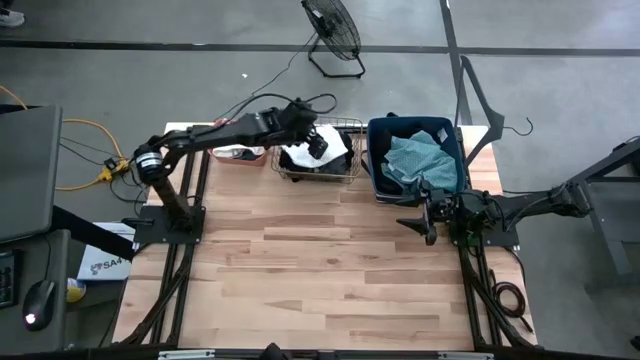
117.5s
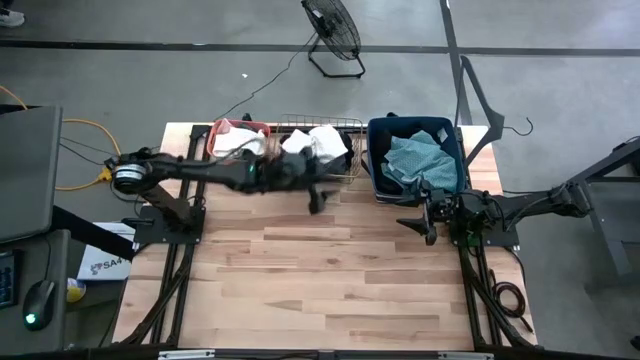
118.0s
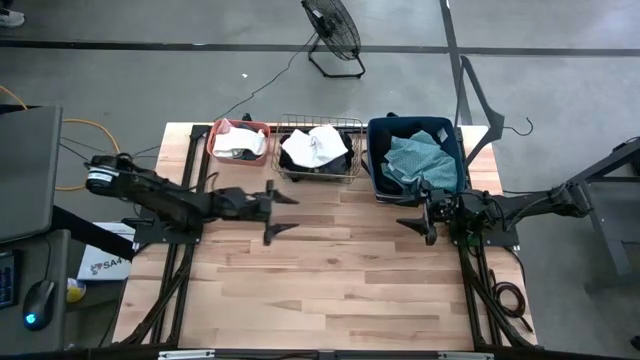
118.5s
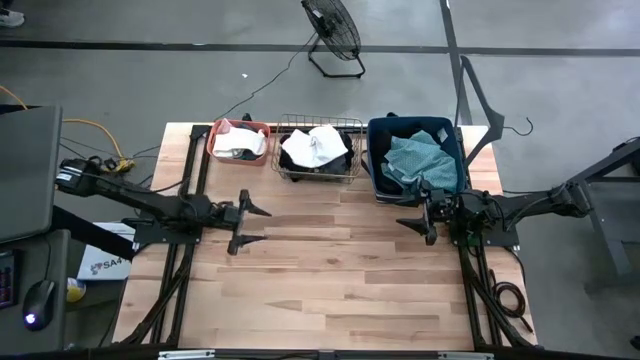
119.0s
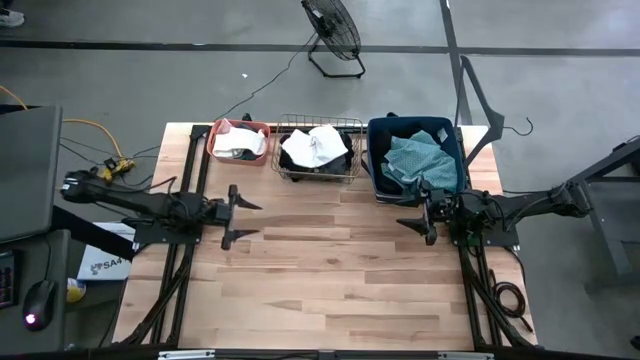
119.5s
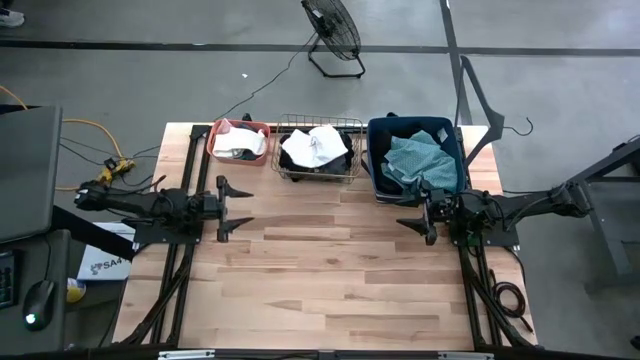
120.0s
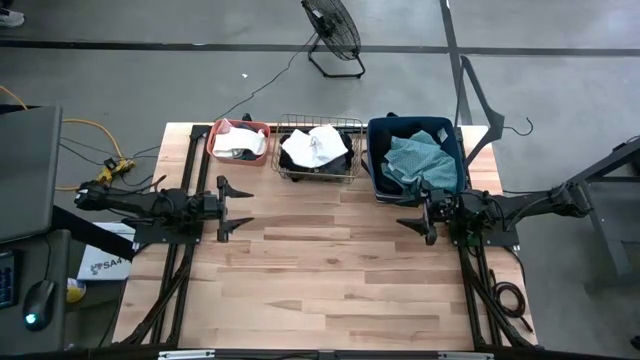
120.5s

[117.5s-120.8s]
Task: Pick & Place Cloths
Return to Home Position

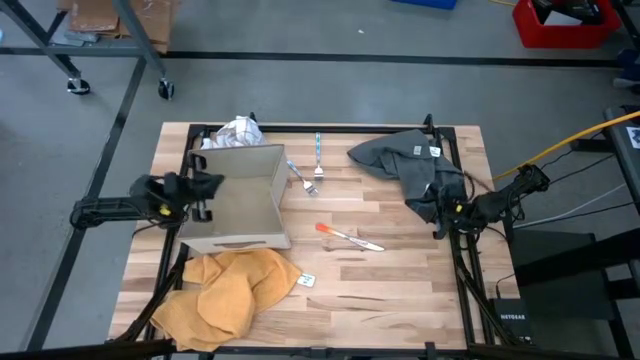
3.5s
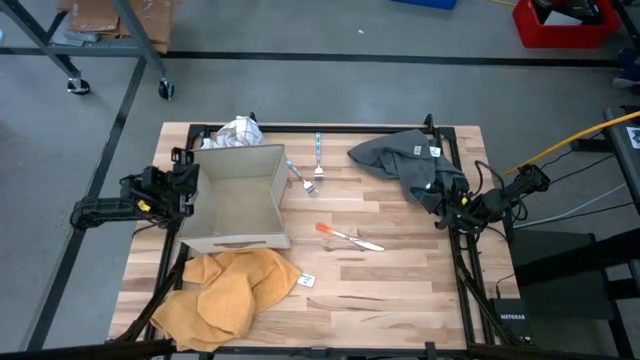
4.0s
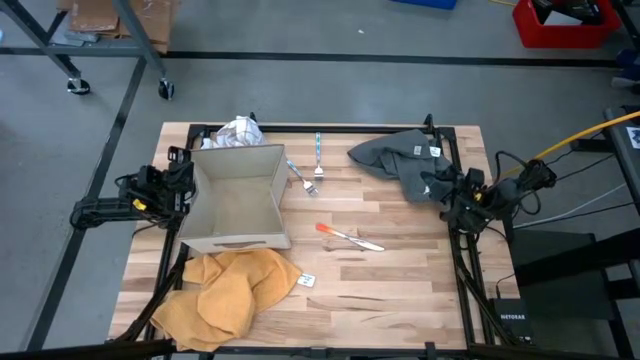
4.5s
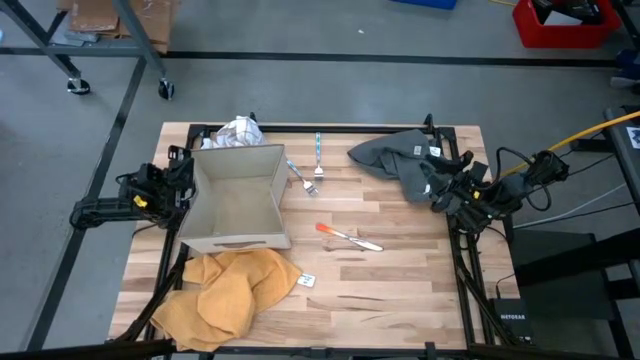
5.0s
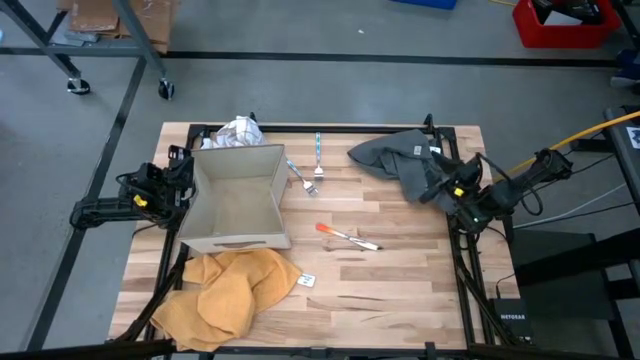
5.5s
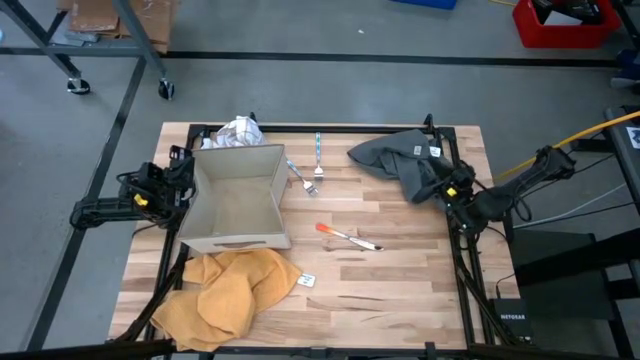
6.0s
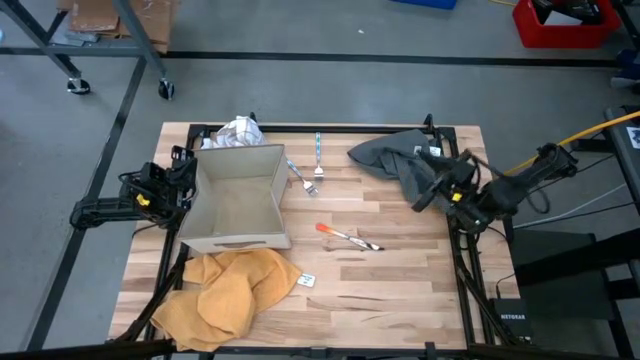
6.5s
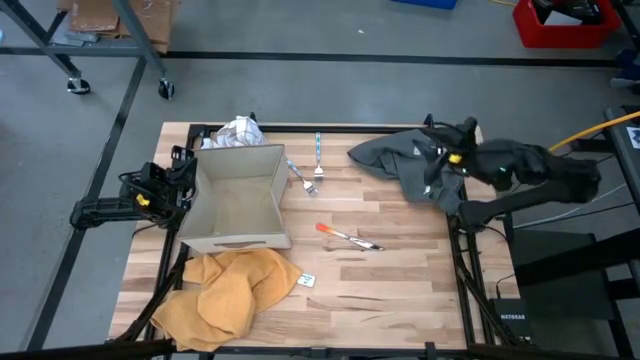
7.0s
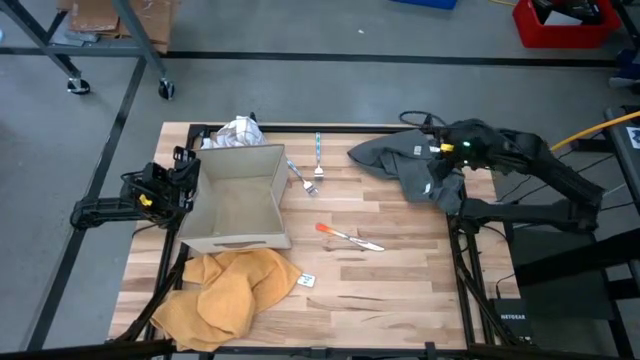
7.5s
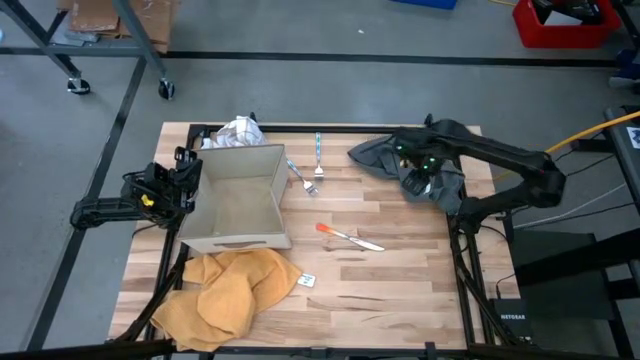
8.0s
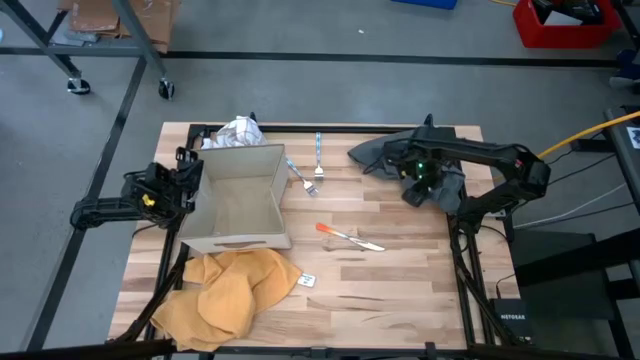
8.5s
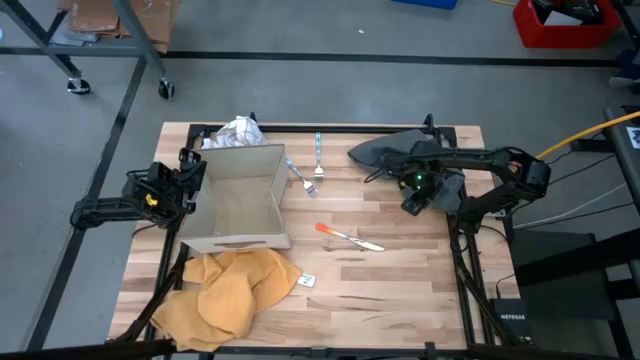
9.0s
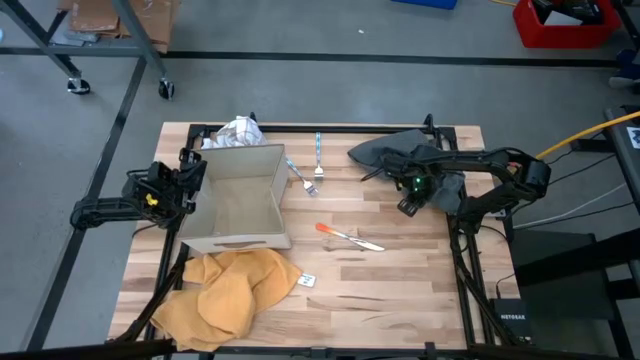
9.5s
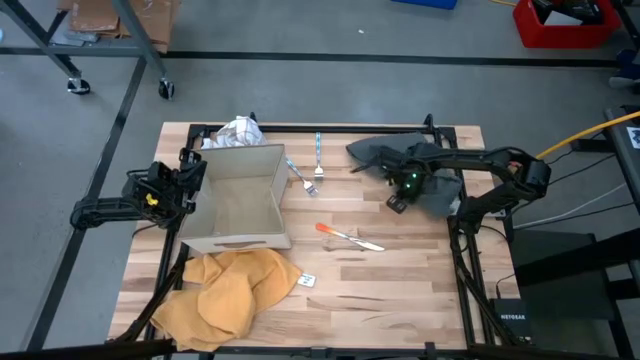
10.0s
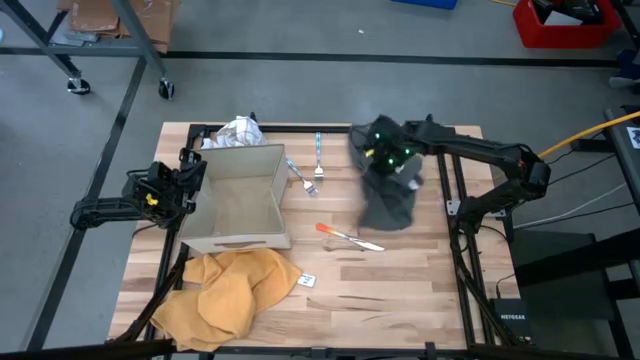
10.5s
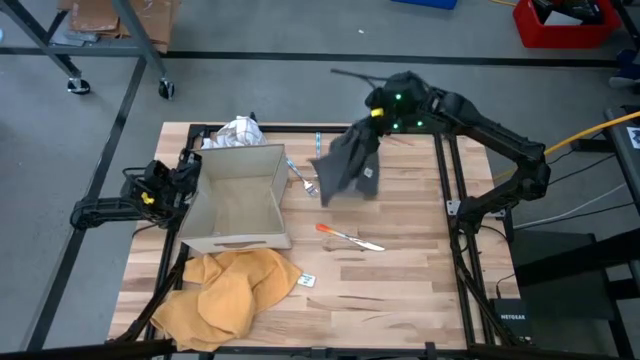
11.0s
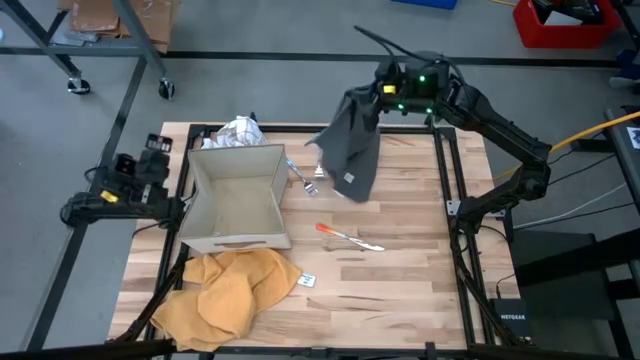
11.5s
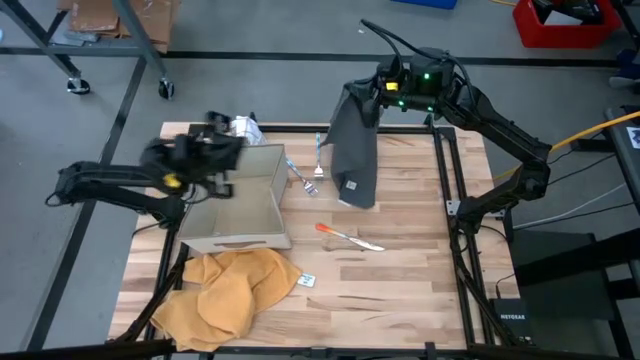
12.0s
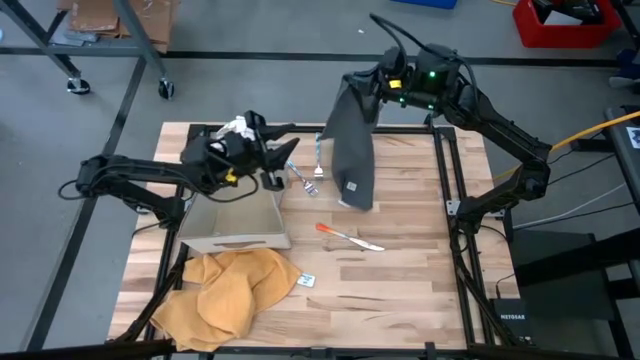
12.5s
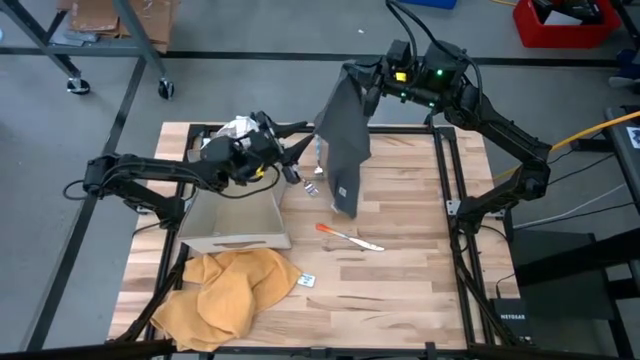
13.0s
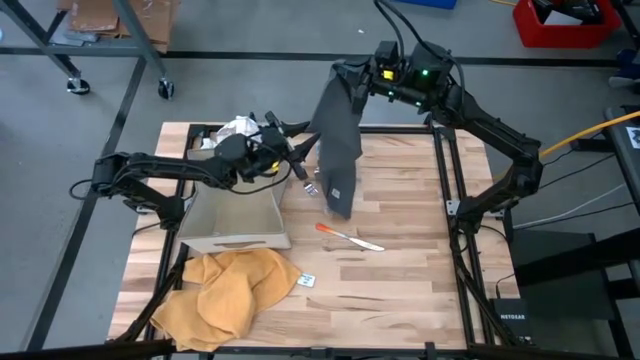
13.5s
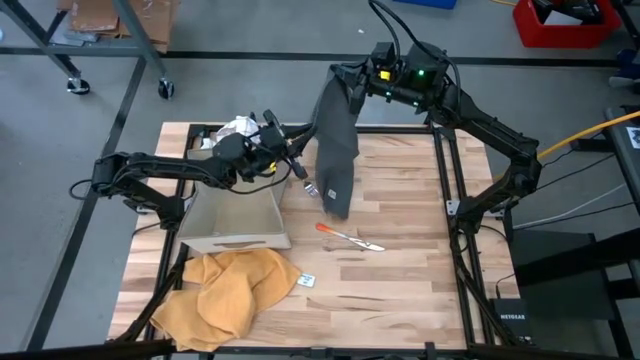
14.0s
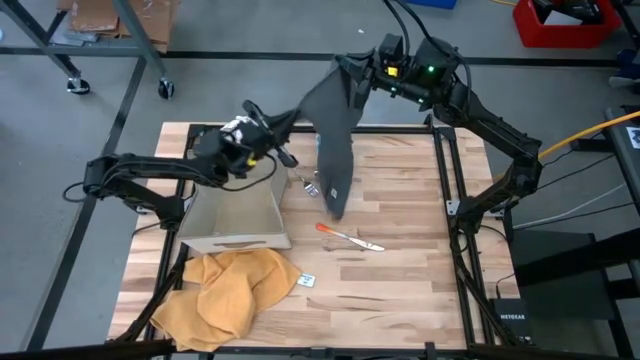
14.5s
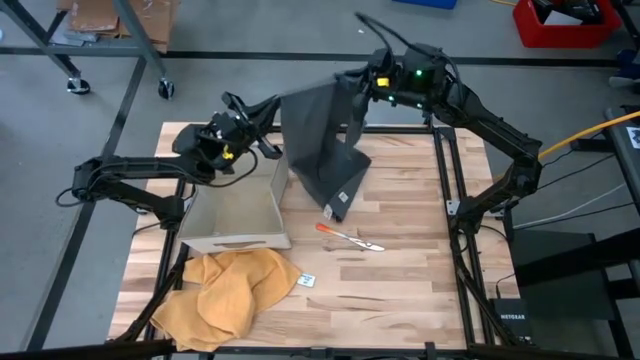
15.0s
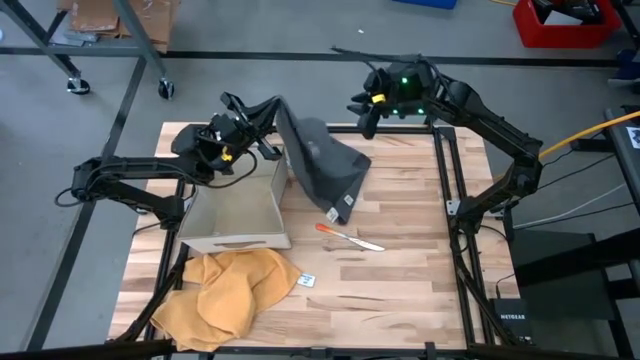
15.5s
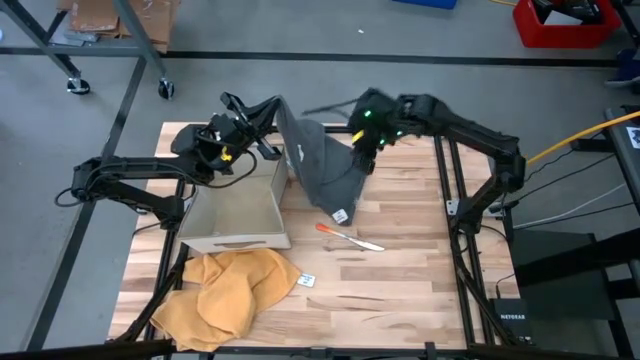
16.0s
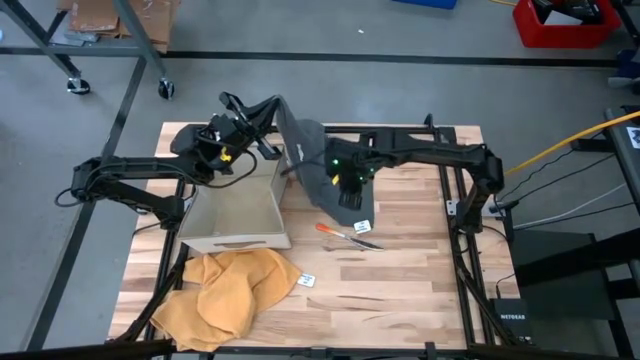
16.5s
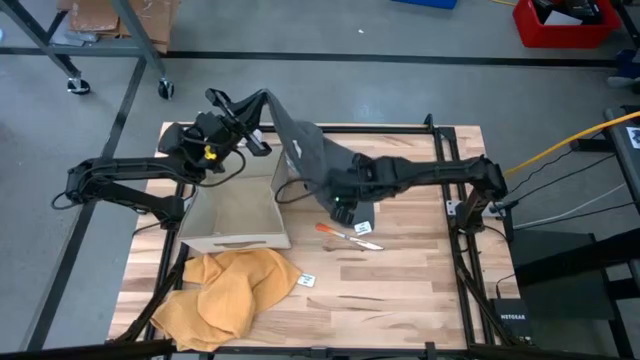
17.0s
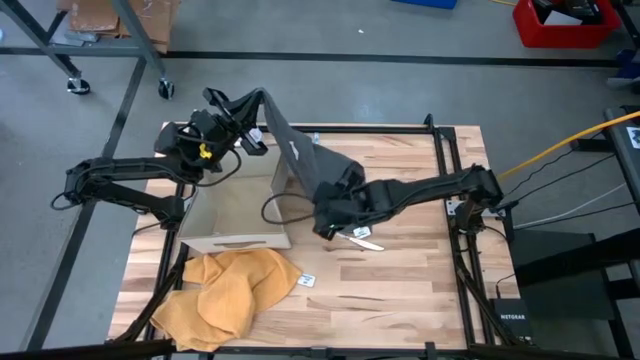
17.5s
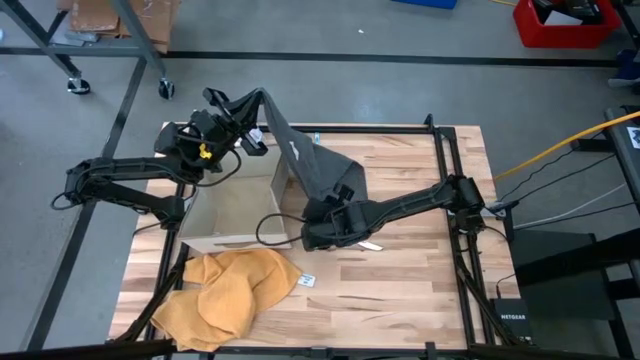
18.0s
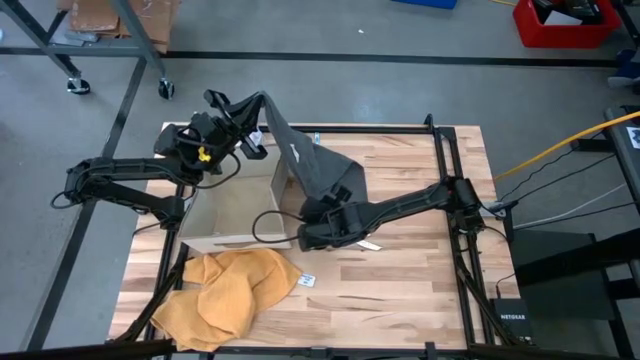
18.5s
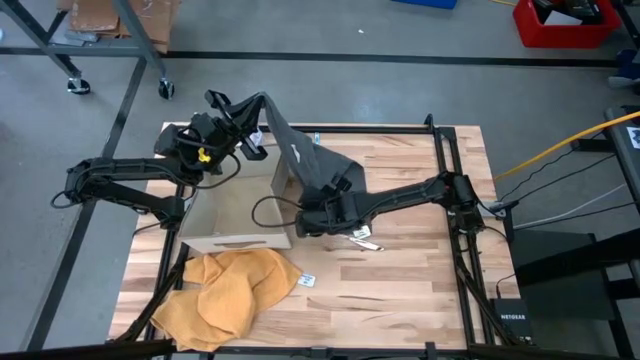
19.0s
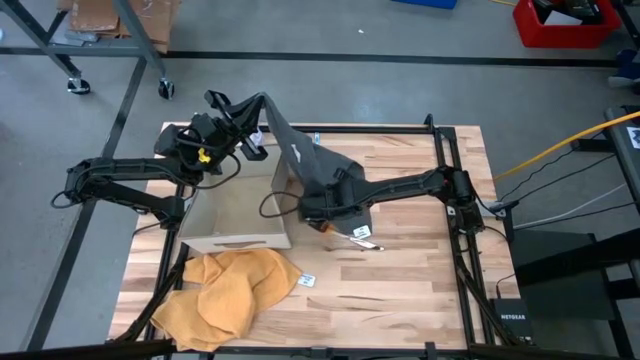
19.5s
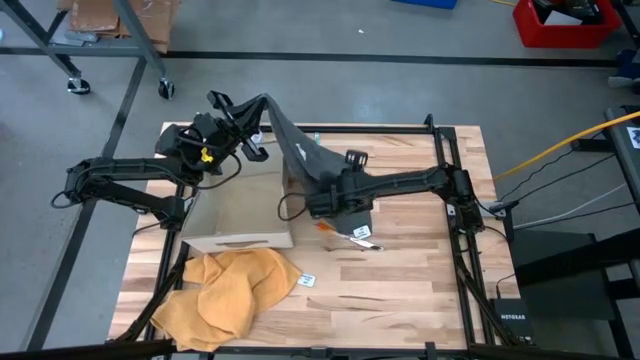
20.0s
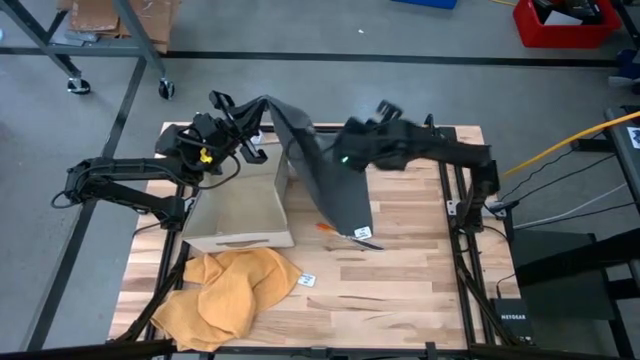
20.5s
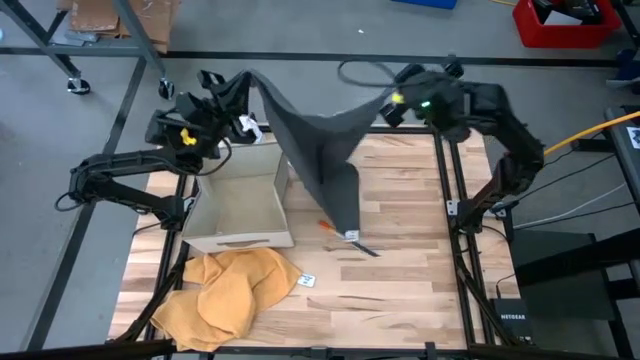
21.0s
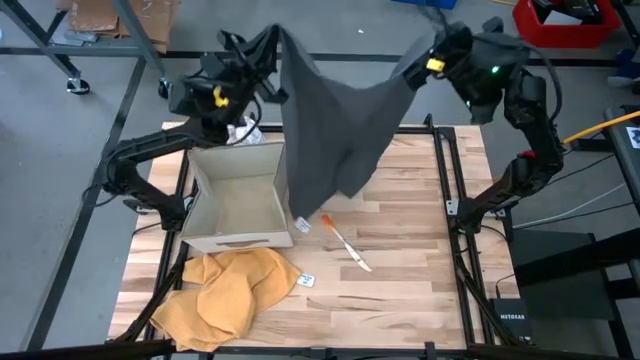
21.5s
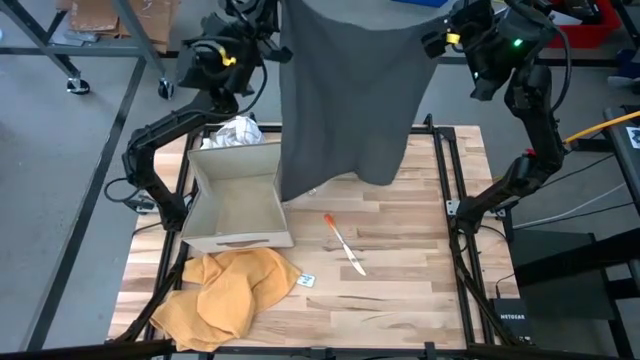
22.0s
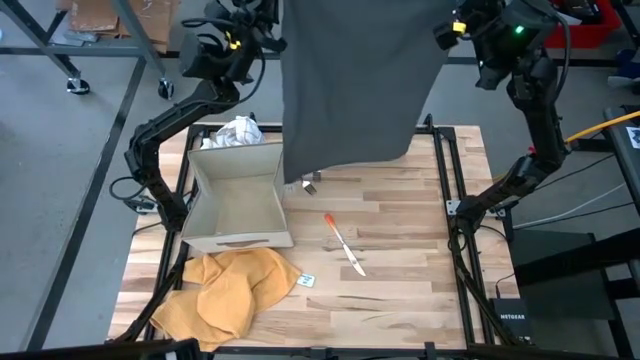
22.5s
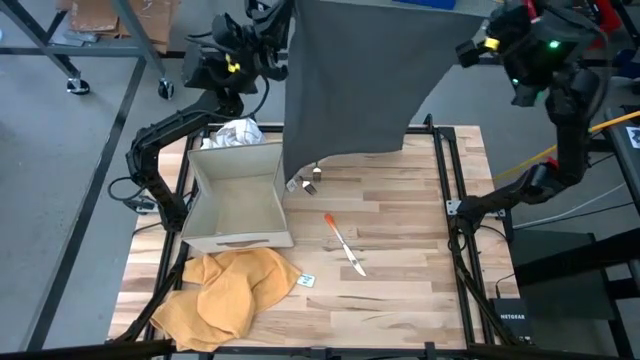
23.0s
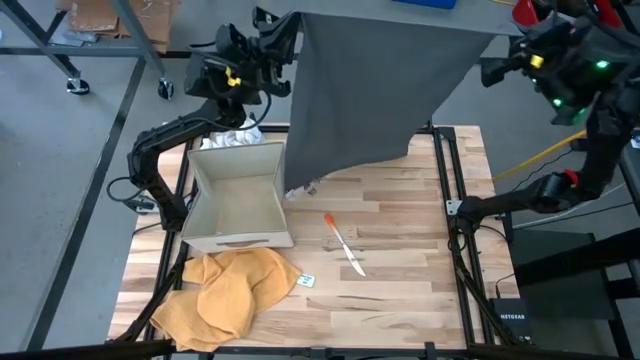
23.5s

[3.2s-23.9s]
Task: Fold towel
Fold the gray kitchen towel
